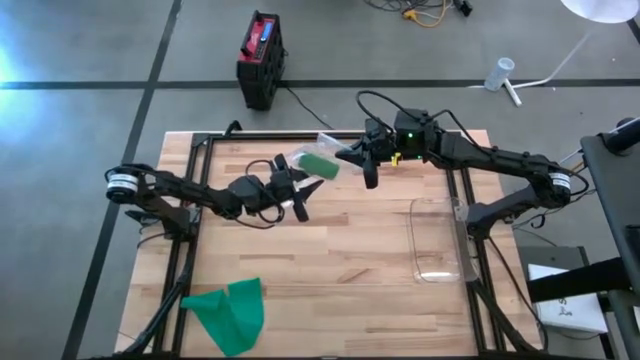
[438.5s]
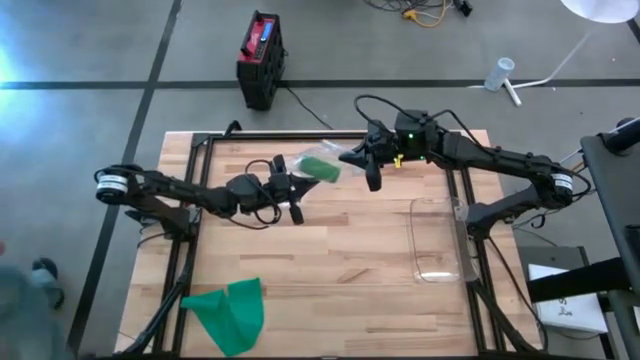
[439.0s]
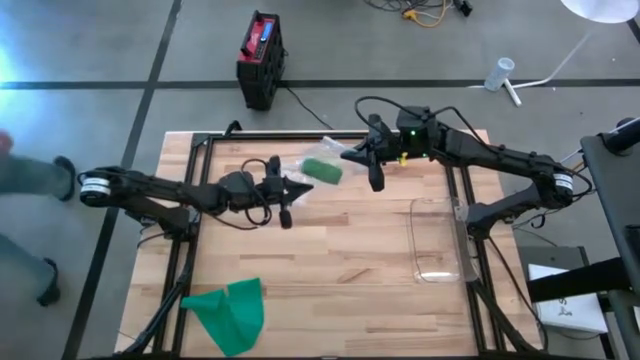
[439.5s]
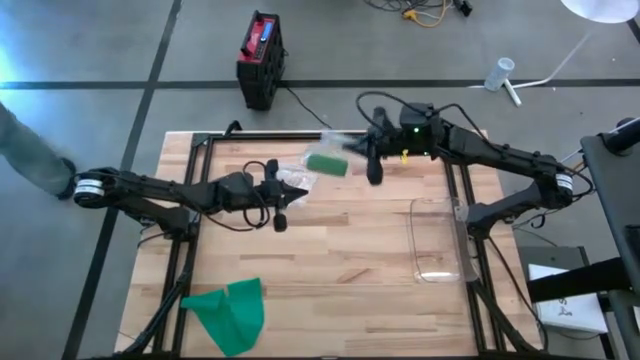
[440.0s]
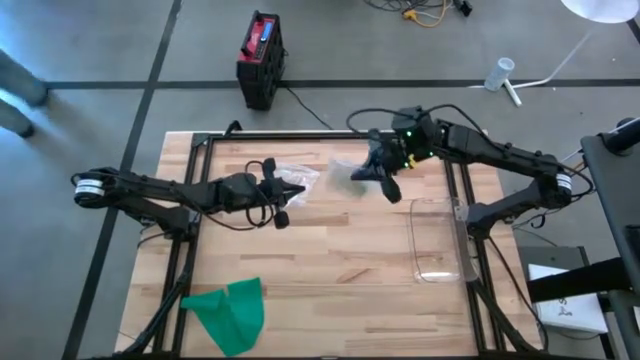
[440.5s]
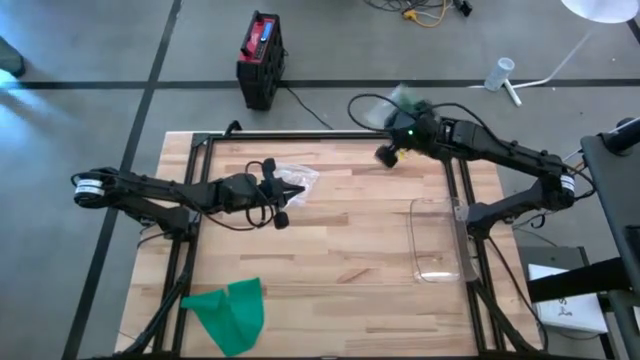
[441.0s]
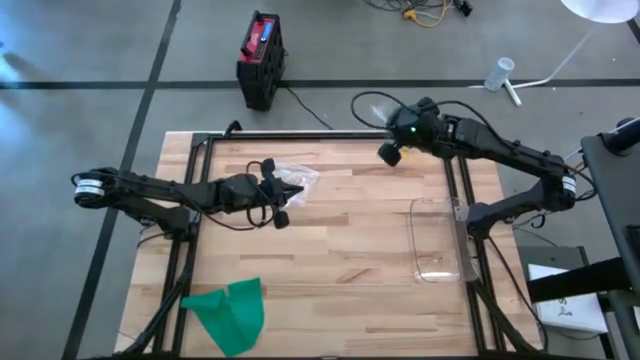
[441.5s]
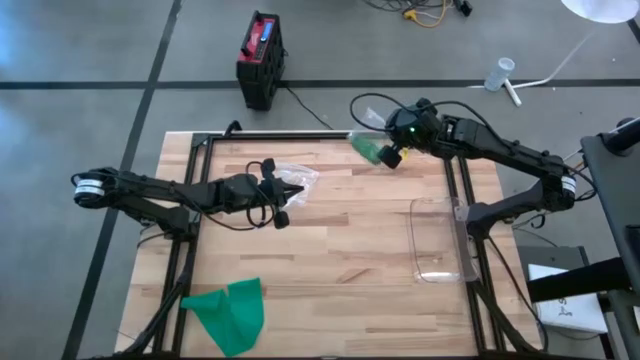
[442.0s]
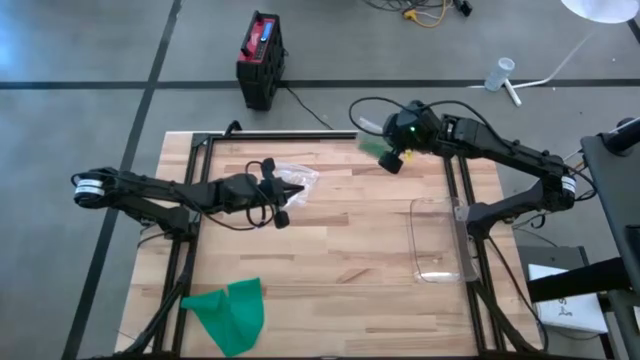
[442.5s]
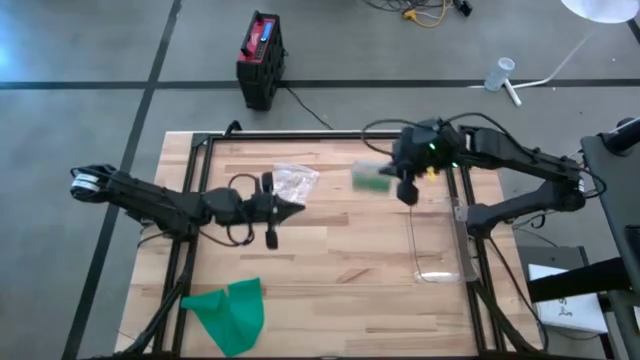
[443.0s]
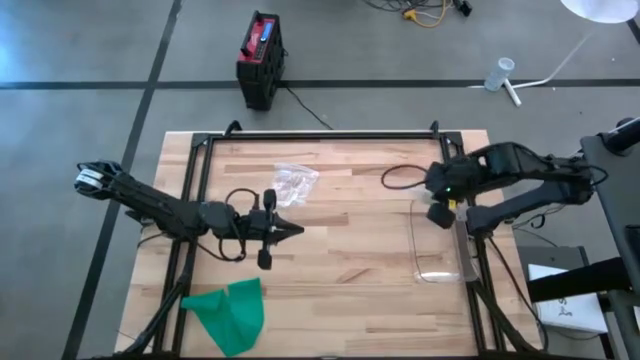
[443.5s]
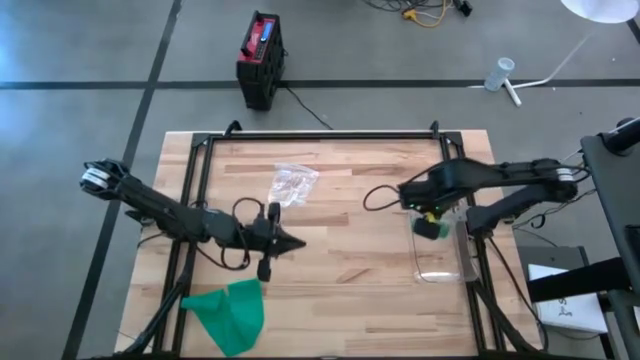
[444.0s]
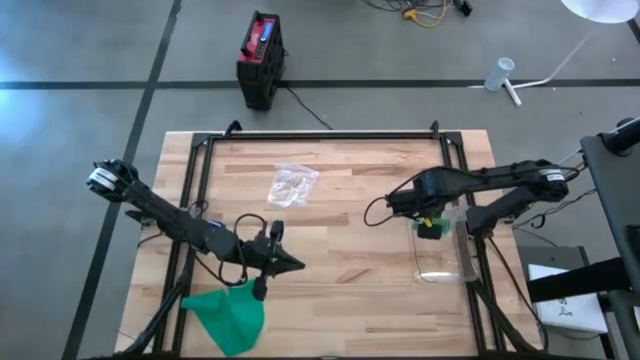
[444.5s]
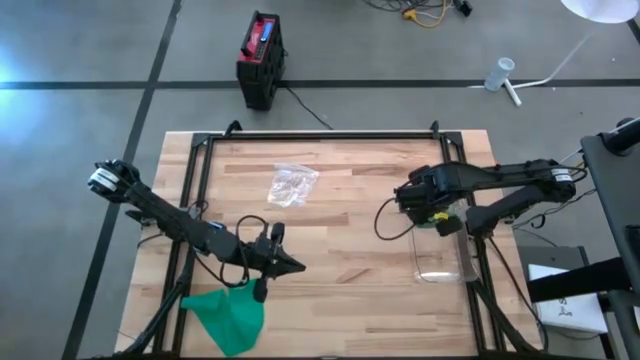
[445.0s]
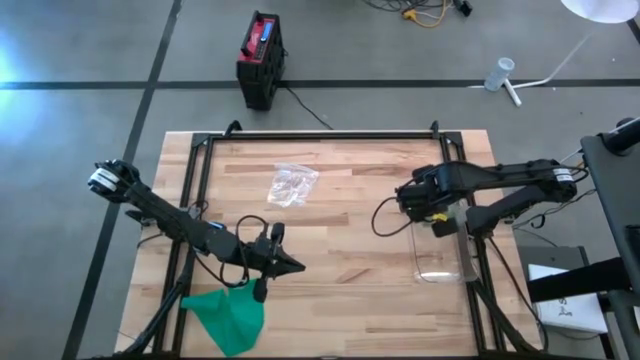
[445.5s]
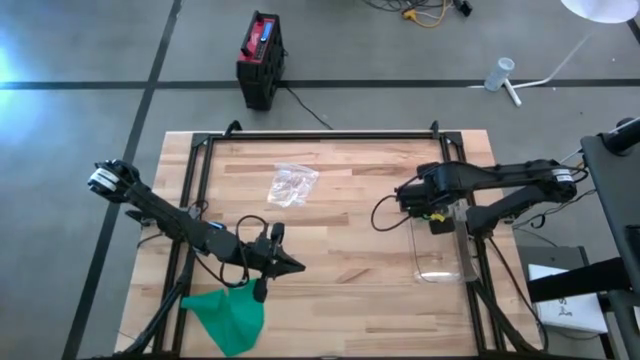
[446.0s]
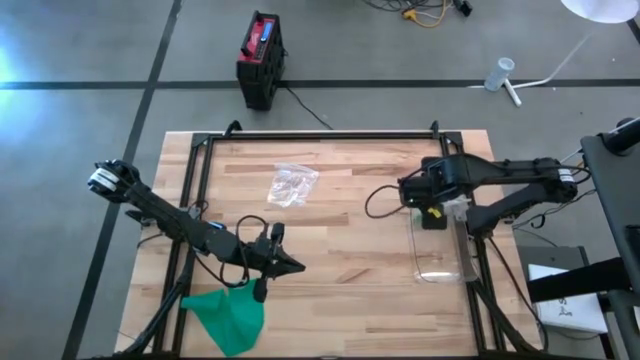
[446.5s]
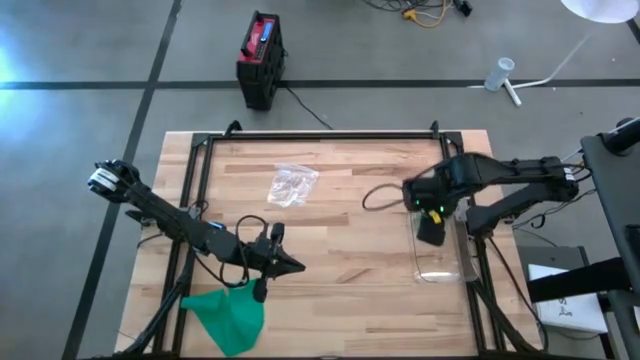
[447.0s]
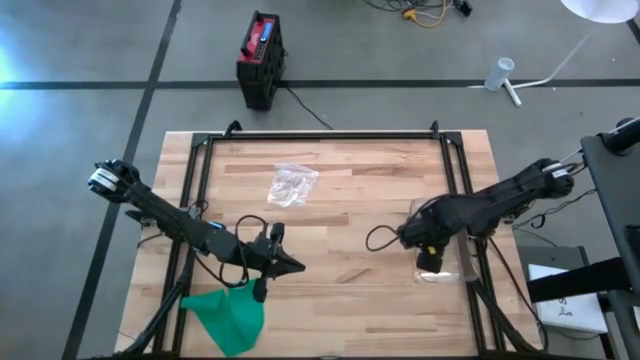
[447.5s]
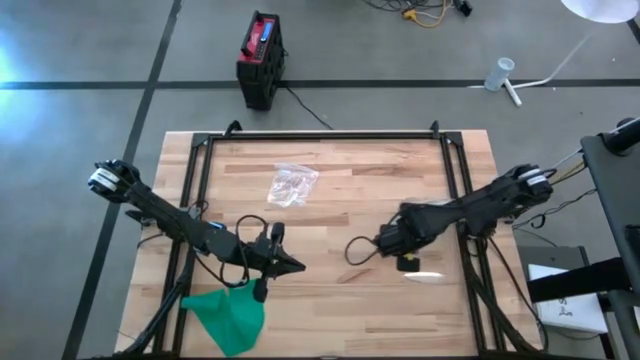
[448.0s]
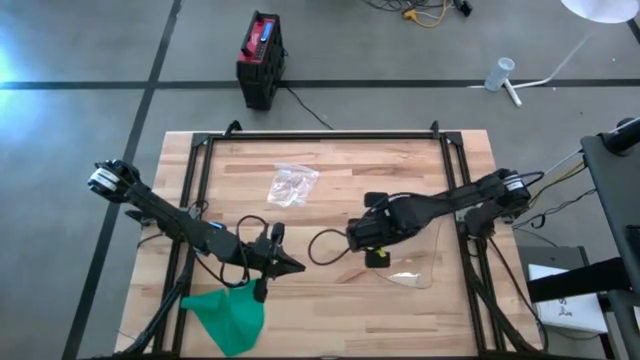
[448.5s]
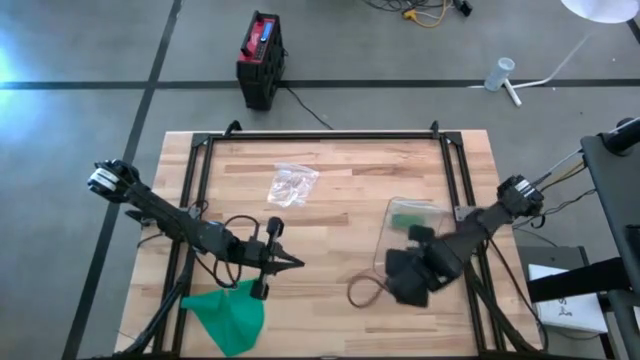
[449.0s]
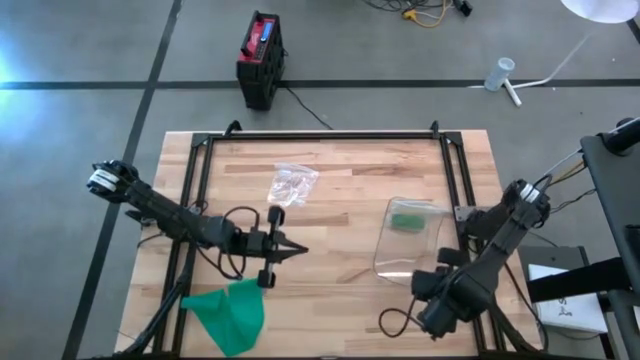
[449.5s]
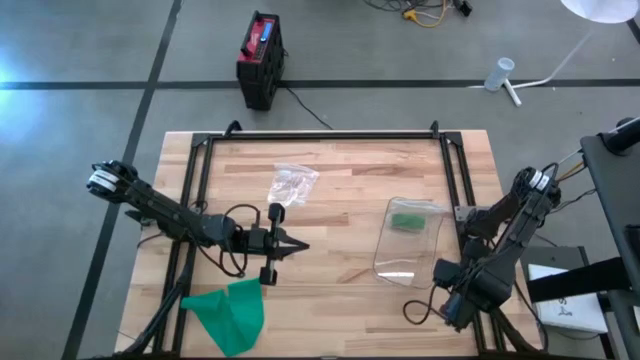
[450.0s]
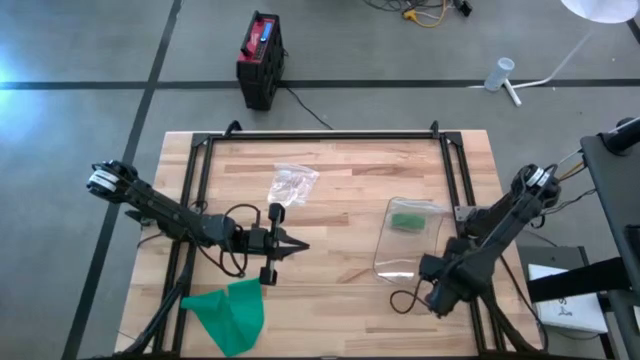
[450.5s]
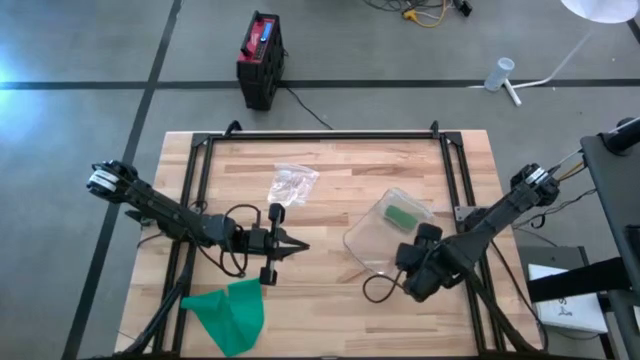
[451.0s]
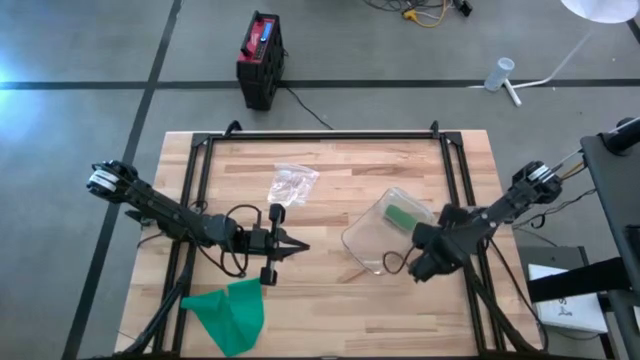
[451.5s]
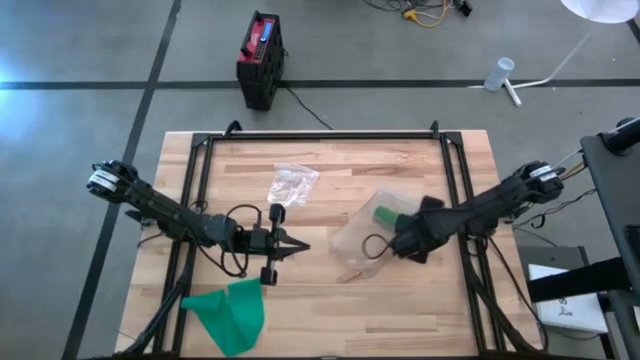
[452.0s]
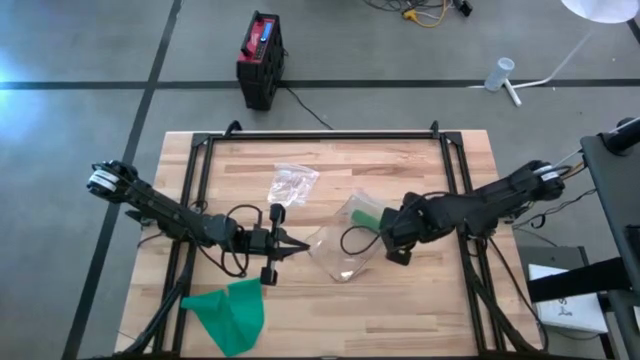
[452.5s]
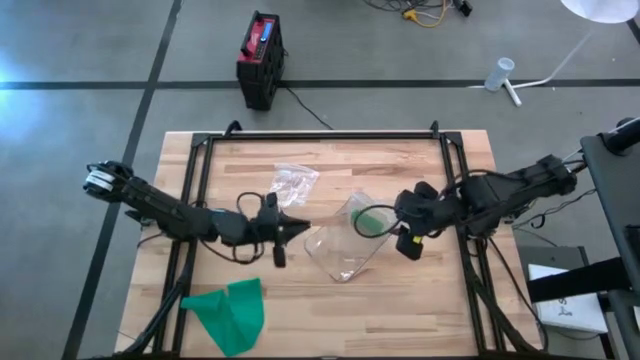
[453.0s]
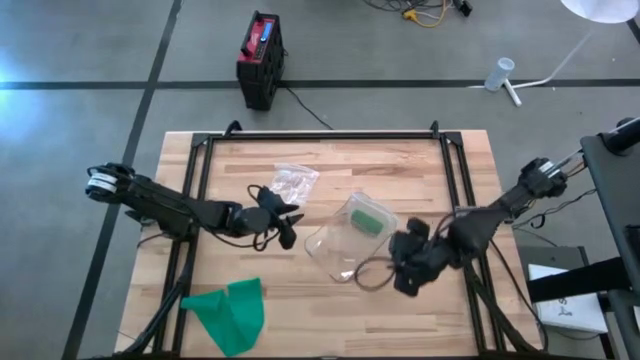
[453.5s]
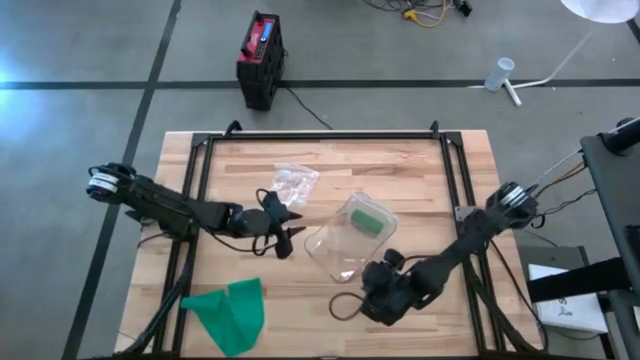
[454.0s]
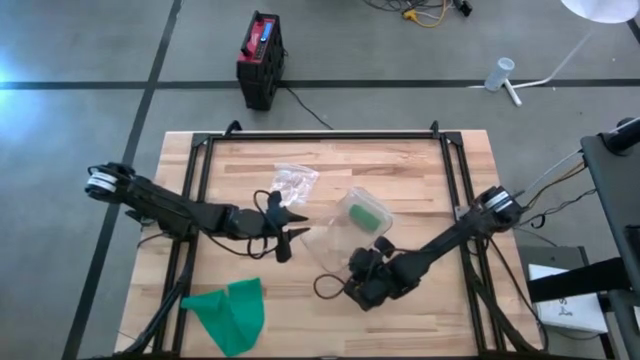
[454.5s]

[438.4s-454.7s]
Task: Roll bandage
Put the transparent zip bag with the rolled green bandage into the transparent bin

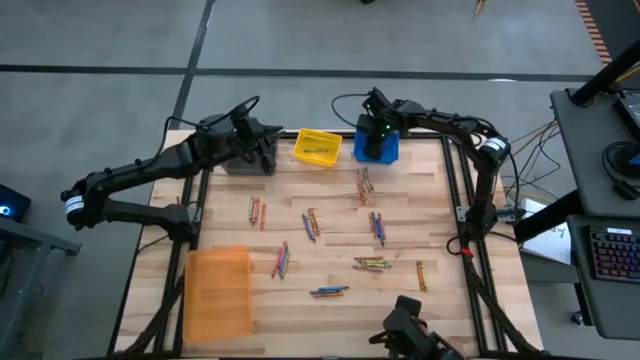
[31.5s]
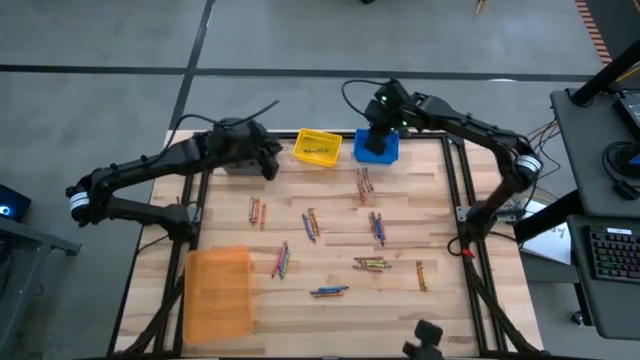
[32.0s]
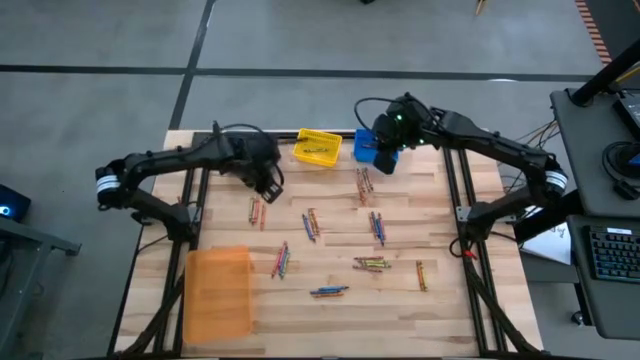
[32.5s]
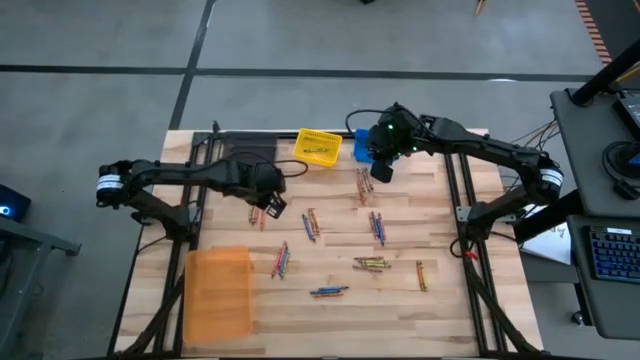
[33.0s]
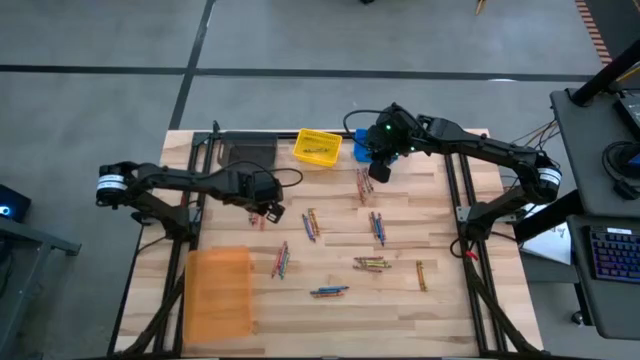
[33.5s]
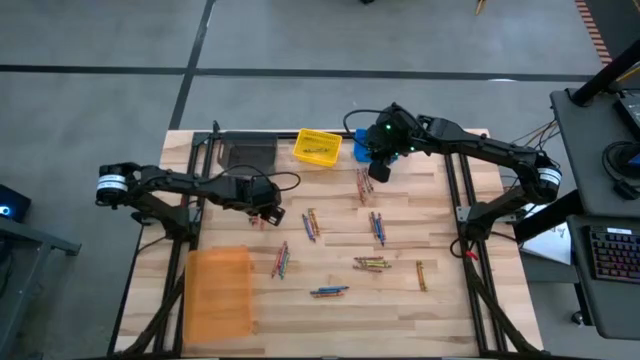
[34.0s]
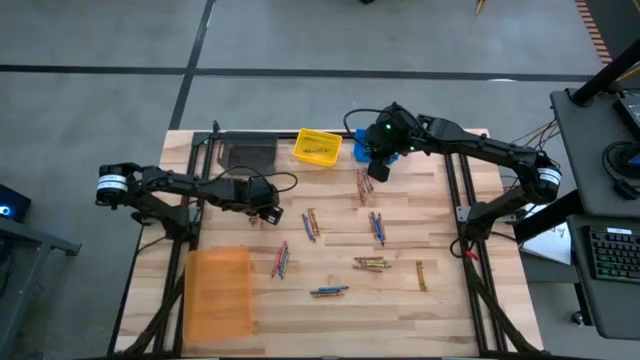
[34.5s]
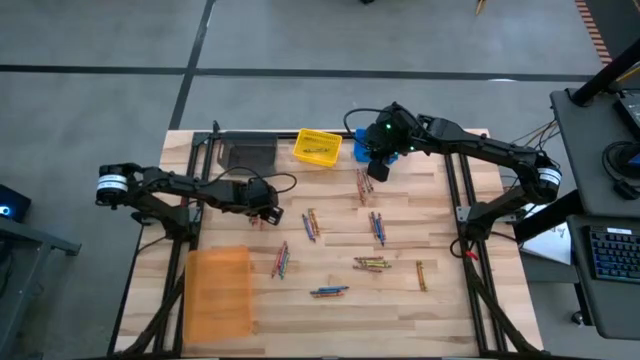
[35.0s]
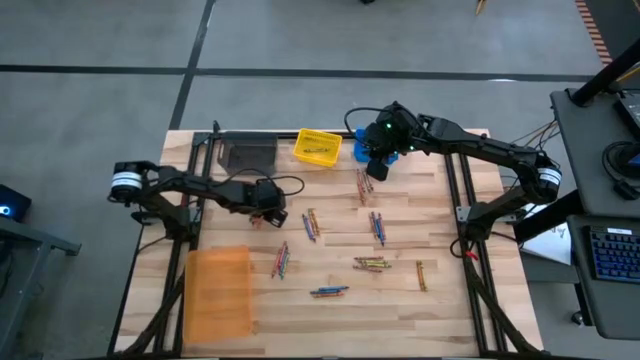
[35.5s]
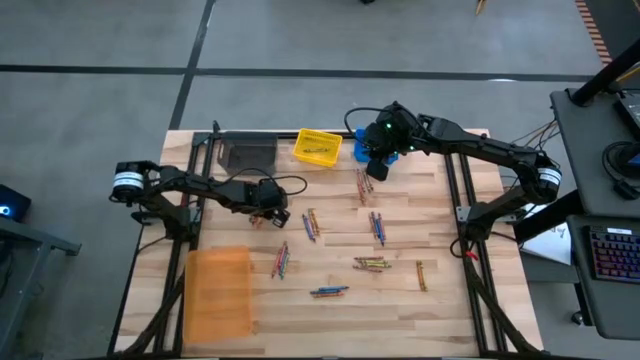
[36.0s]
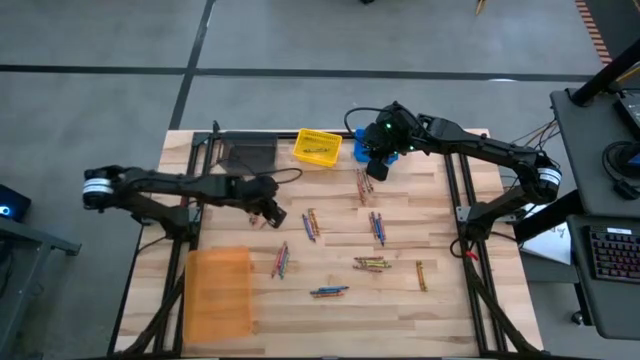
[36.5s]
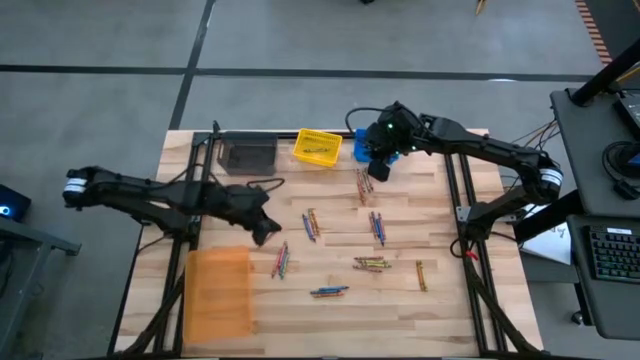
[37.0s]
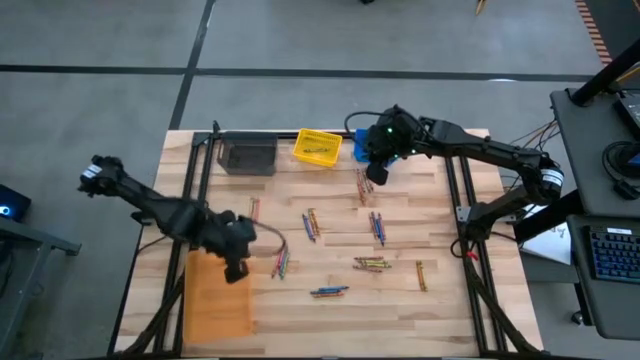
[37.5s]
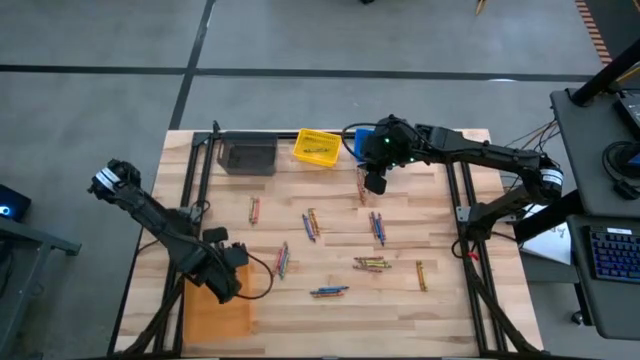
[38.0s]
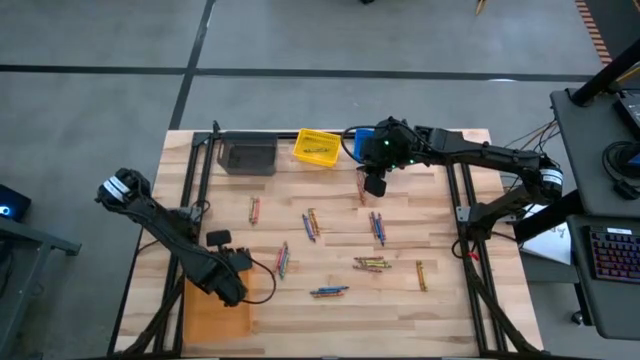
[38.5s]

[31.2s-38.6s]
Task: Sort crayons
Put the orange crayon into the orange bin
